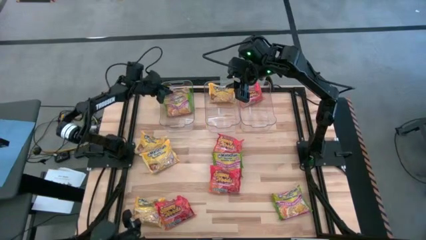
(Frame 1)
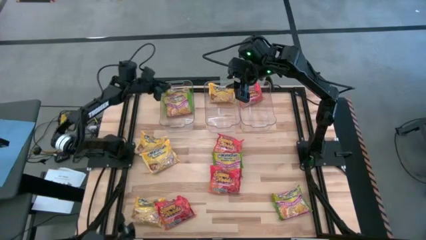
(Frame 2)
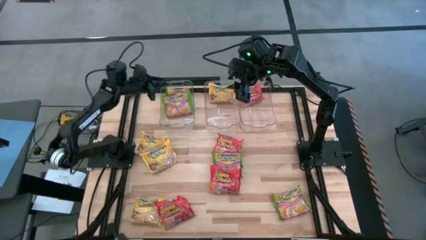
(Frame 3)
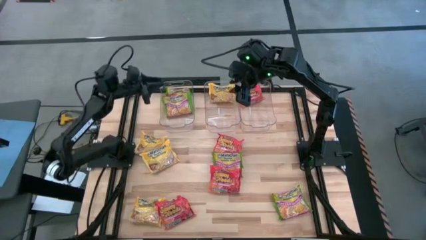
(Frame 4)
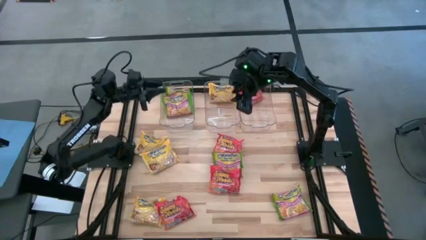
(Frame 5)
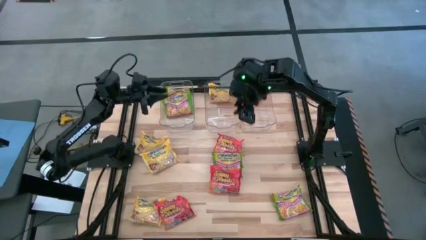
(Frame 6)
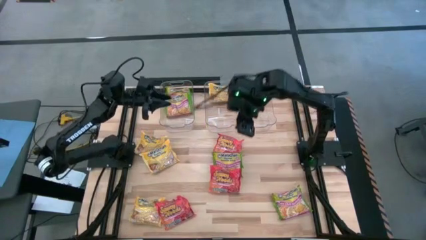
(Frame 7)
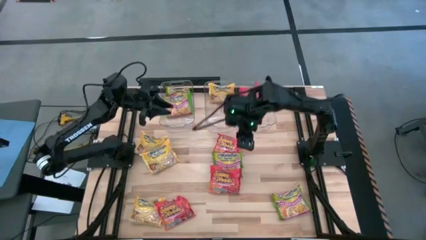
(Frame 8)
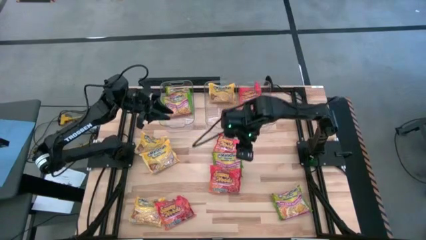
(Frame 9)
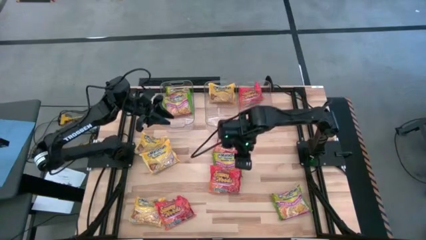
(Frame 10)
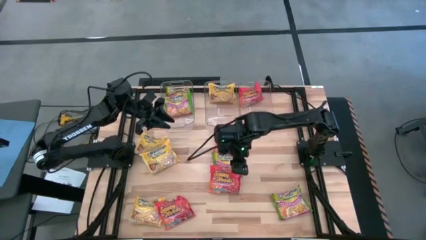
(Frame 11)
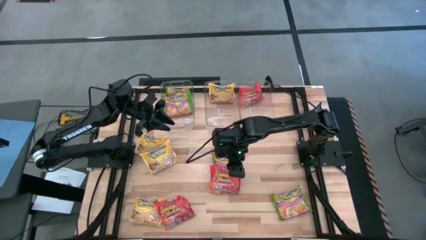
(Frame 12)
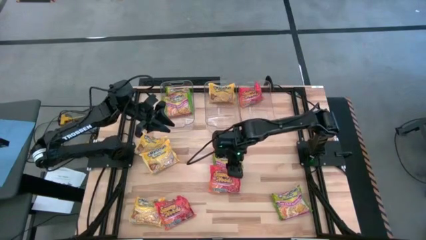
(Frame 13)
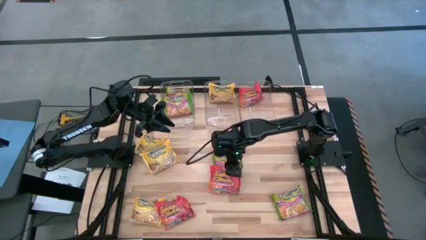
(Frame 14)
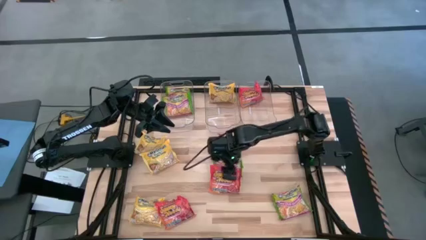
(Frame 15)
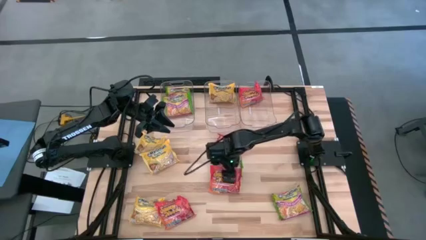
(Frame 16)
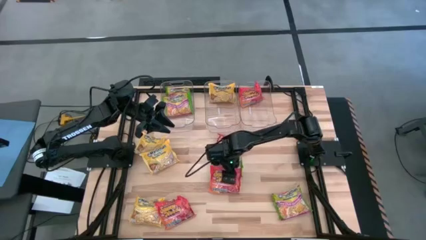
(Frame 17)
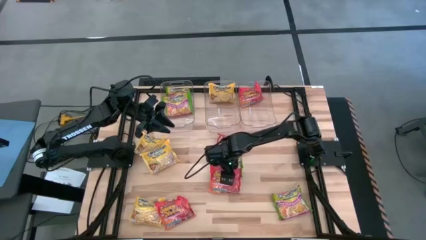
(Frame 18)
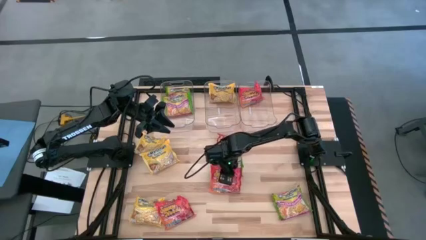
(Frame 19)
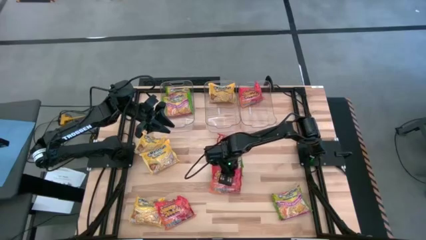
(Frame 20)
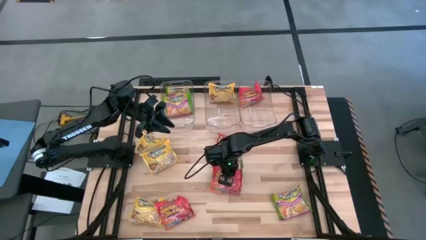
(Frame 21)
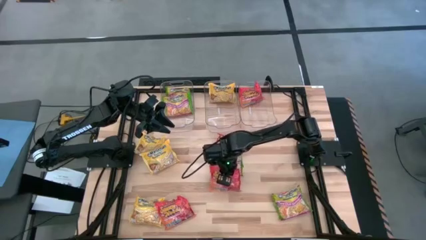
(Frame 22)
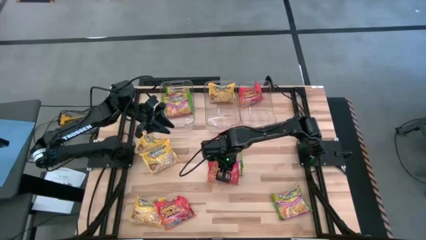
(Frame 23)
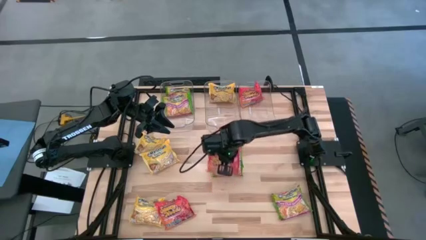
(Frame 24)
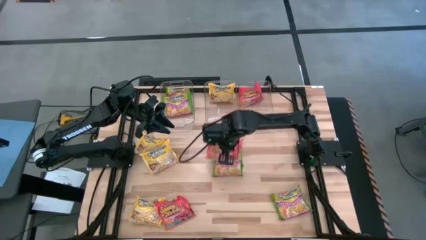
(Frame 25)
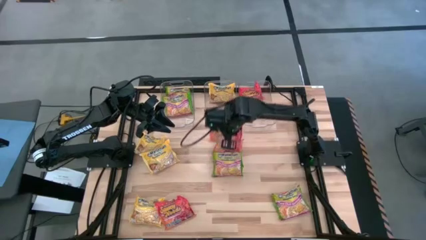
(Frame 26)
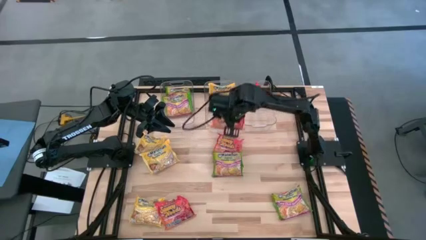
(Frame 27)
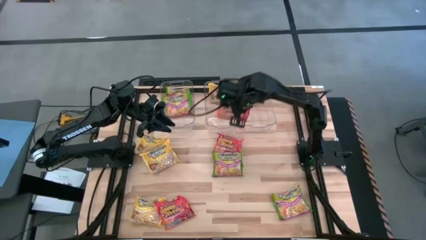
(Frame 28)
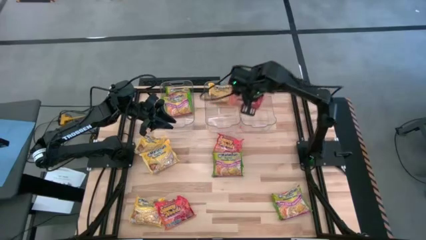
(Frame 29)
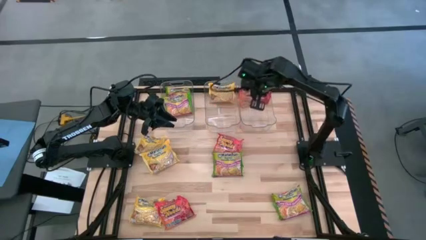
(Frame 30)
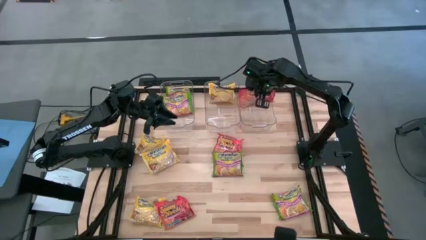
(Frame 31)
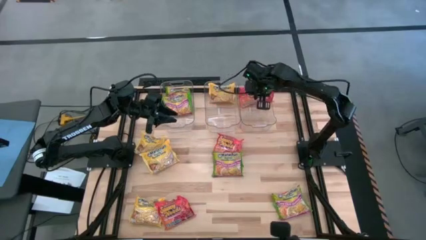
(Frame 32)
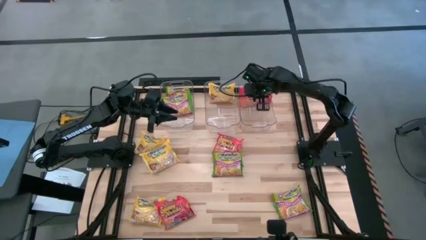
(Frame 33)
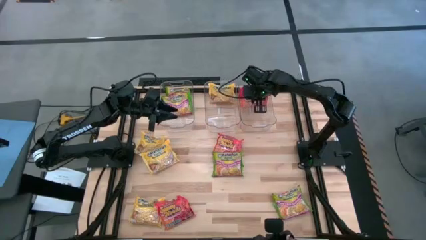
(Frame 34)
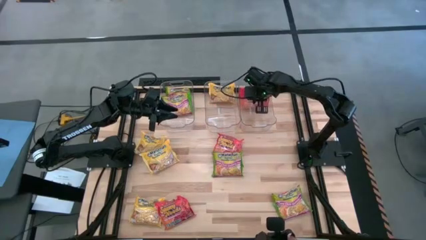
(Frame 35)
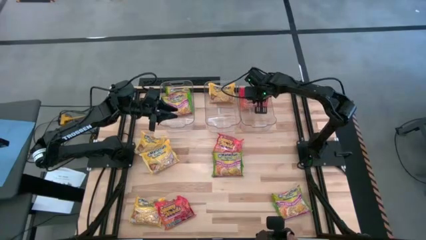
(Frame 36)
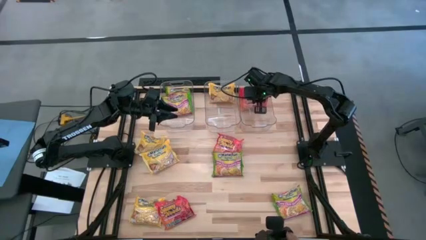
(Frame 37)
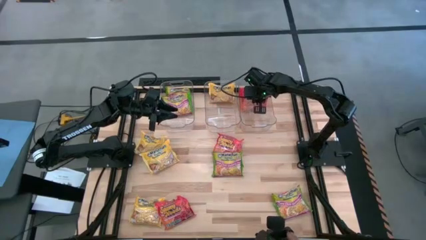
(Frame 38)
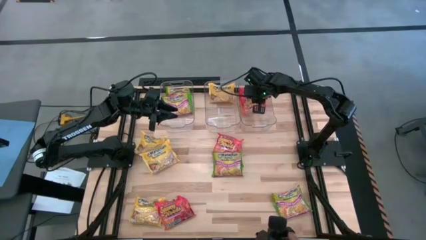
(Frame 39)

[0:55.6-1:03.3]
Task: Sort Maruchan noodles
Put the red noodle pack into the right transparent bin

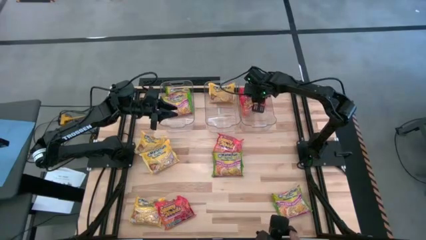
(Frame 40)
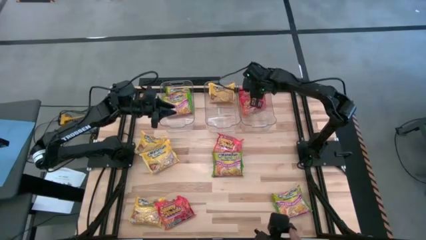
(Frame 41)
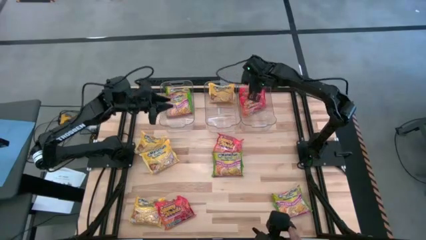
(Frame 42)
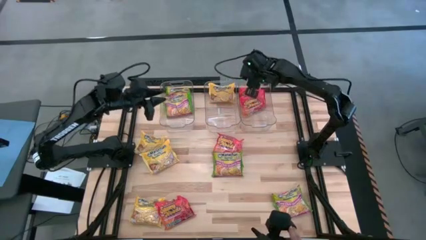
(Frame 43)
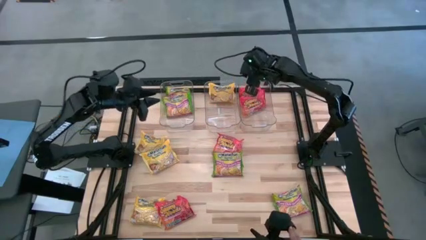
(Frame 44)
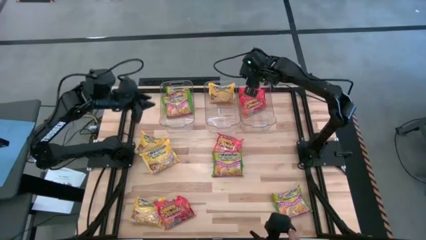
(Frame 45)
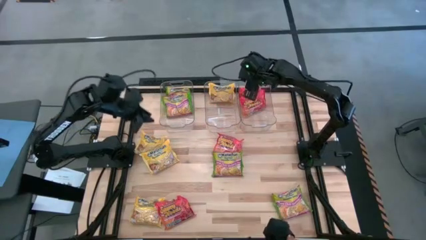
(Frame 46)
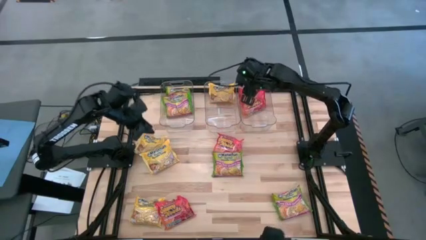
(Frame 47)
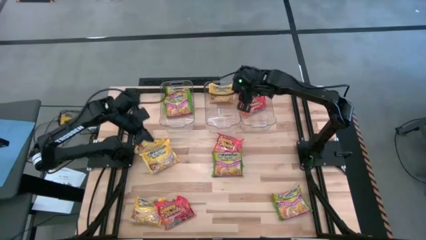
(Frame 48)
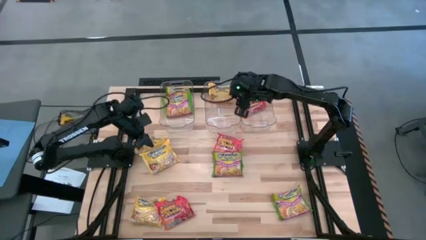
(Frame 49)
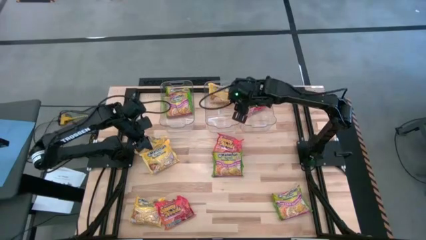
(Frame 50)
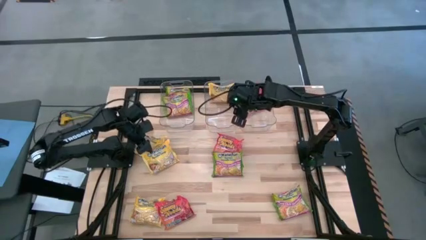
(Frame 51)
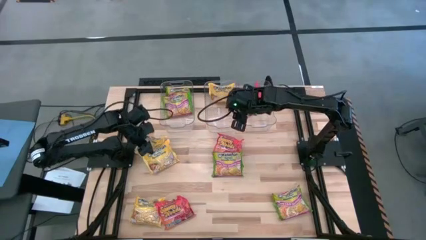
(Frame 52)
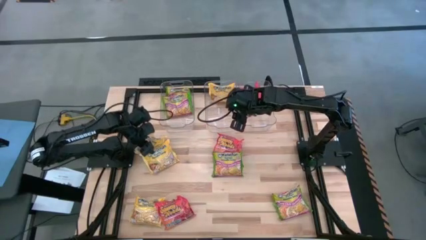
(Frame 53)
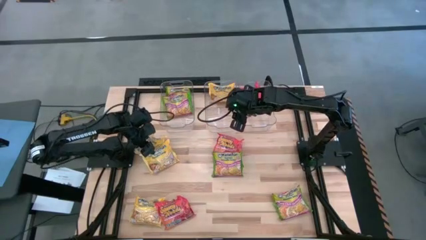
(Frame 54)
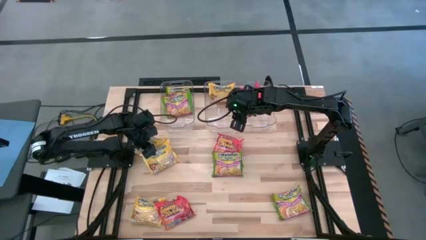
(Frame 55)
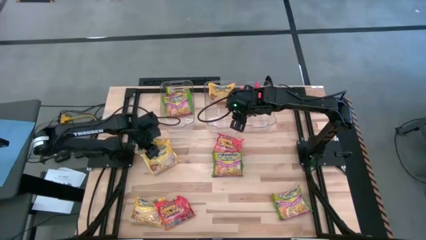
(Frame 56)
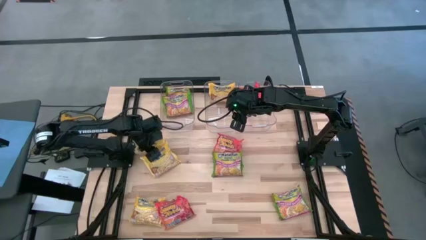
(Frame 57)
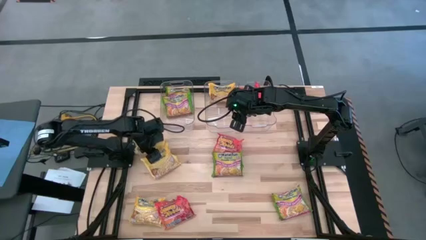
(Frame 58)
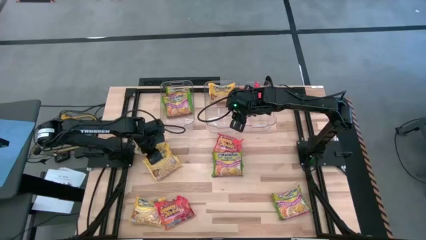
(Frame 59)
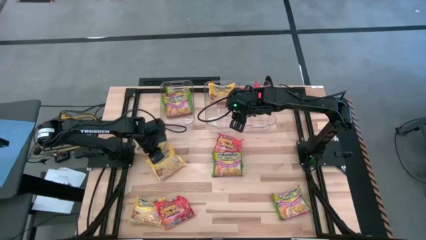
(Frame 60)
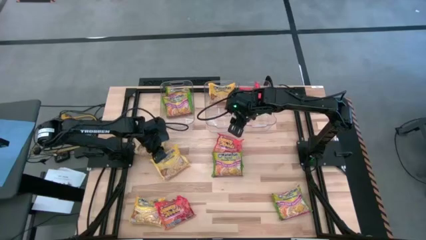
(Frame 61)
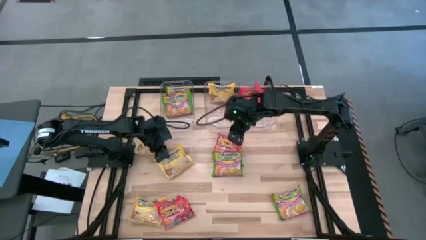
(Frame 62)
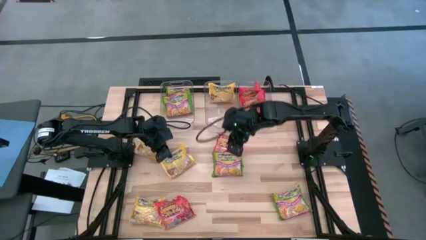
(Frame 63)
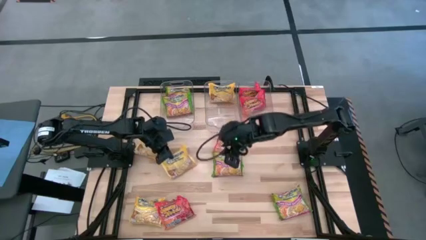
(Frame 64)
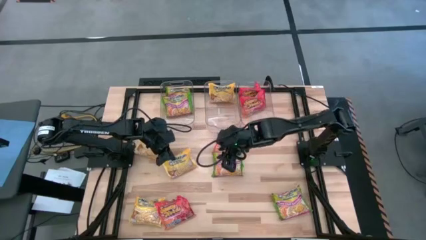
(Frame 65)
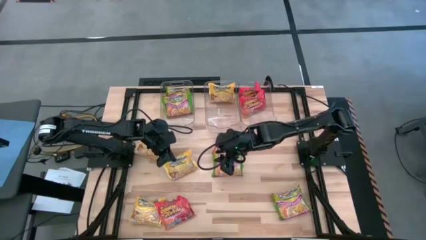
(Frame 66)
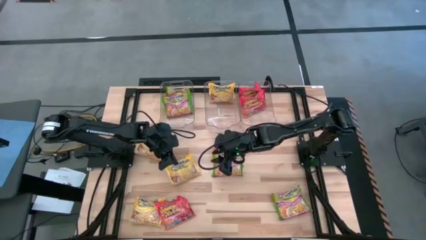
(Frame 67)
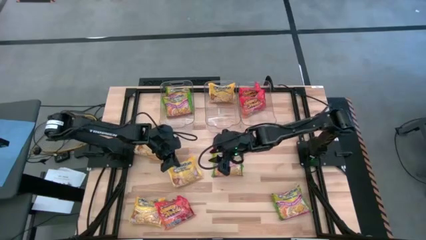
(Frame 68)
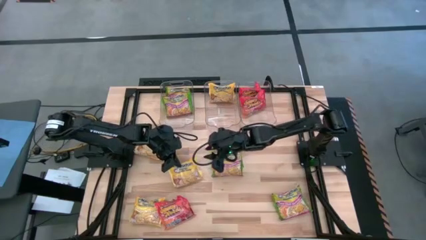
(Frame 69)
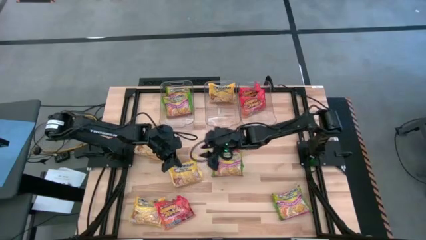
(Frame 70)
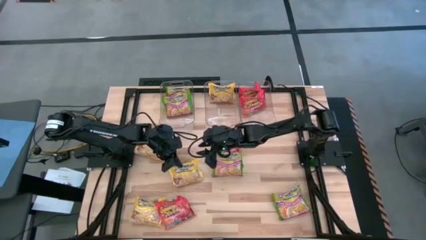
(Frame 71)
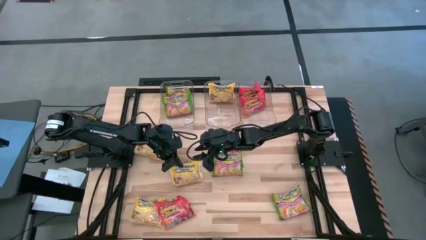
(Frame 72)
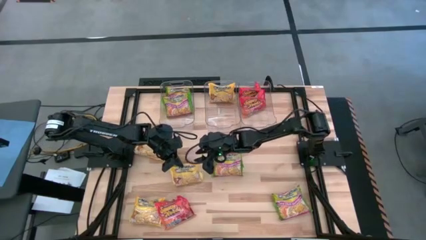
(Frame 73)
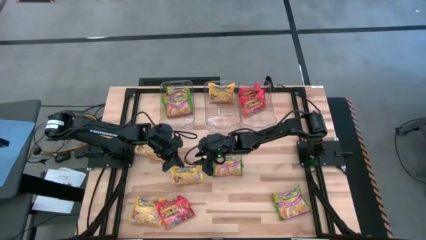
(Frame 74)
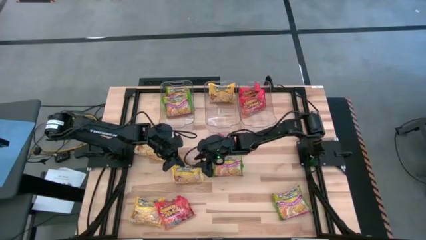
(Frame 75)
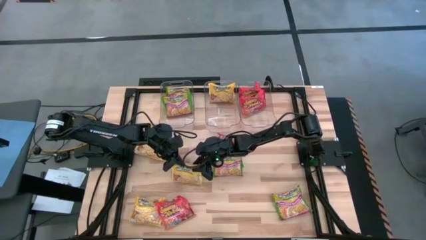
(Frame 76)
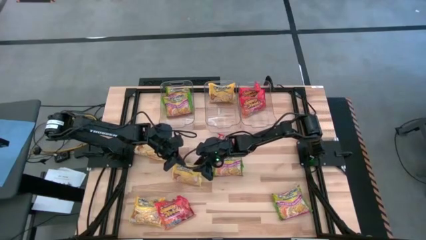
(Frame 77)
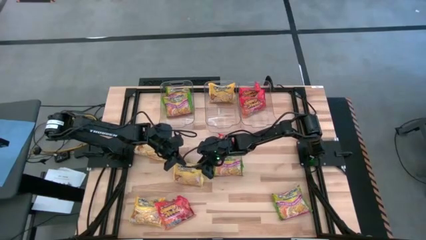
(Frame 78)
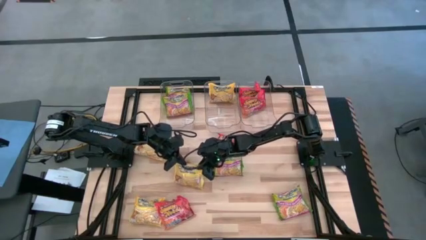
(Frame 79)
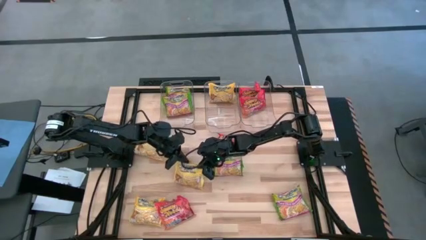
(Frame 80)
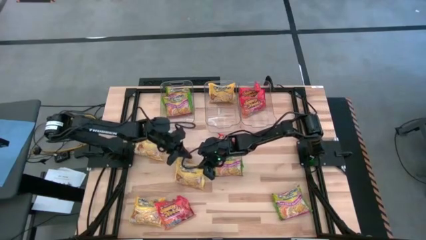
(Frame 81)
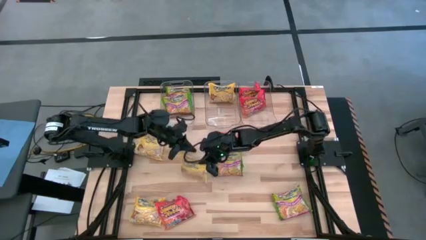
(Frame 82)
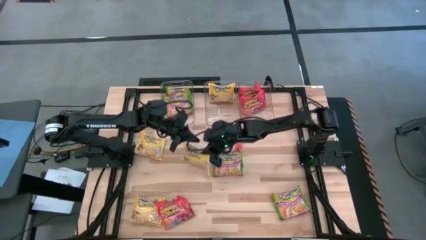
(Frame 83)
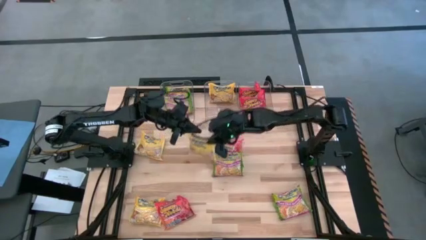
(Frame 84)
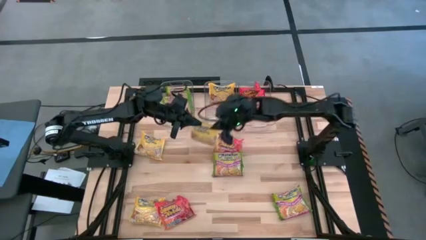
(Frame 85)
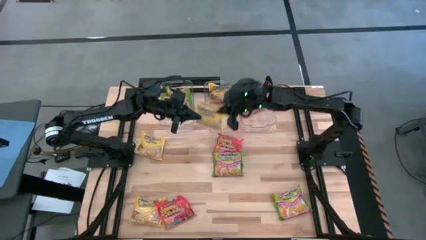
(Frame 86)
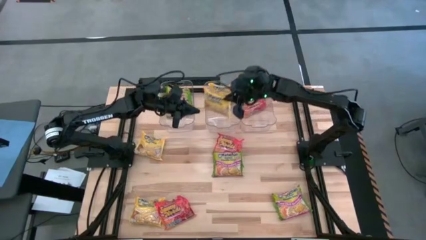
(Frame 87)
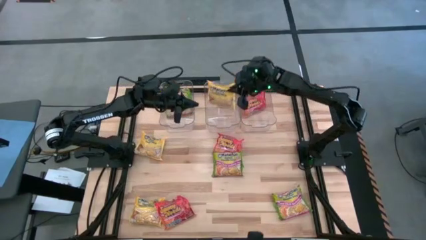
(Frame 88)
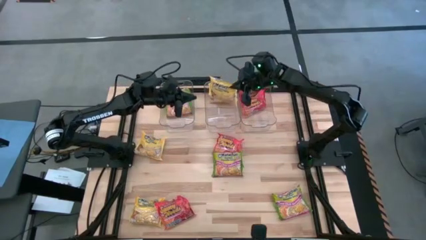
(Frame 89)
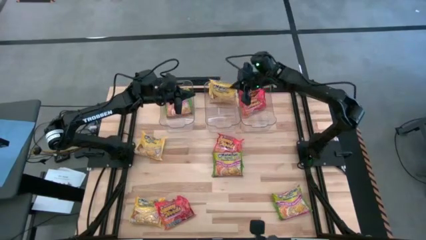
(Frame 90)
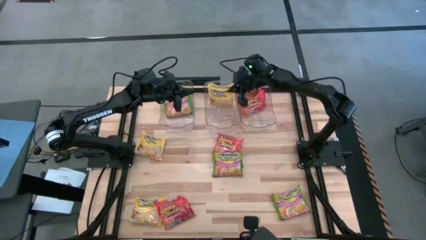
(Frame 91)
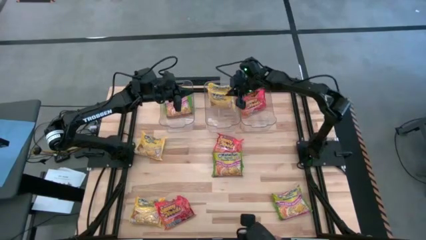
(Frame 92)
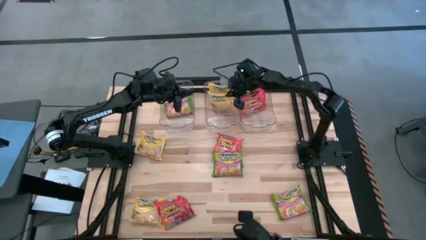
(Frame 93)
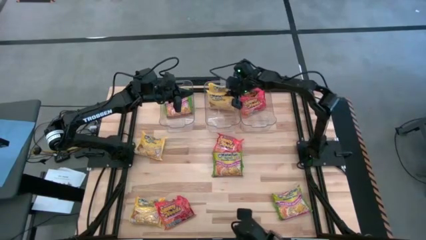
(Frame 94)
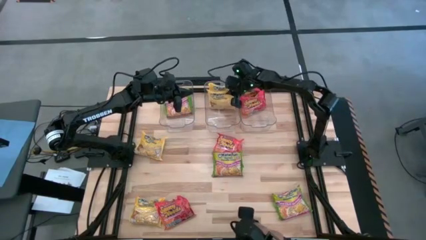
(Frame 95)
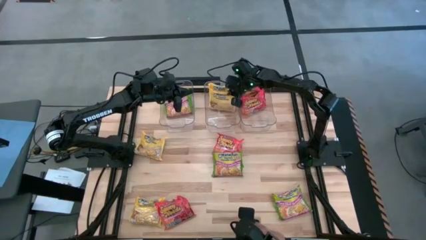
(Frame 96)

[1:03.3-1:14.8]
Put the yellow noodle pack into the middle transparent bin
